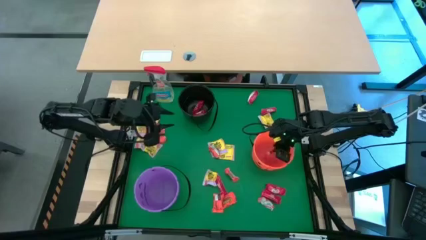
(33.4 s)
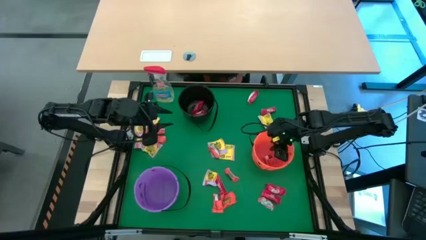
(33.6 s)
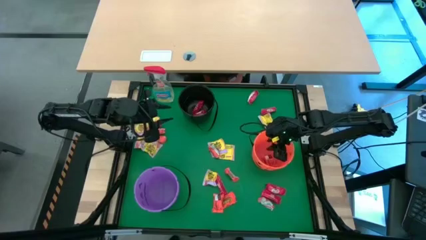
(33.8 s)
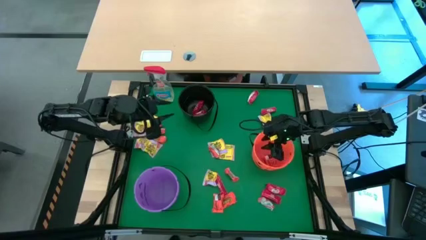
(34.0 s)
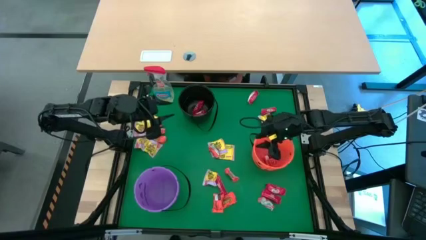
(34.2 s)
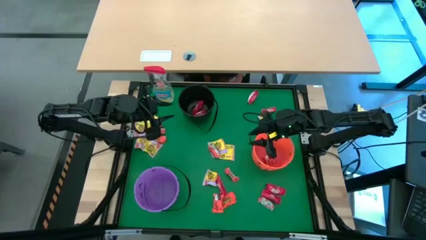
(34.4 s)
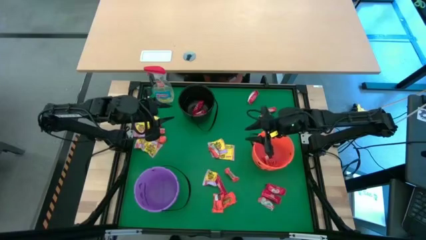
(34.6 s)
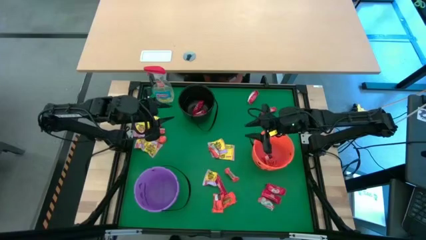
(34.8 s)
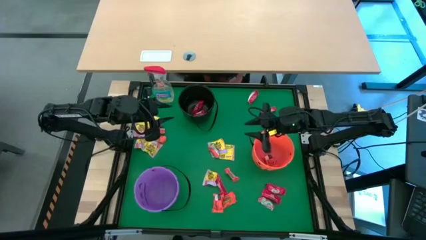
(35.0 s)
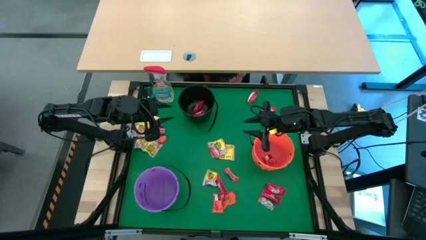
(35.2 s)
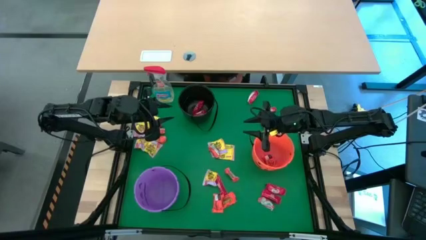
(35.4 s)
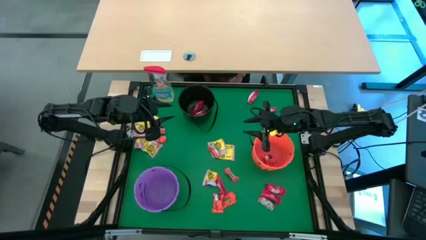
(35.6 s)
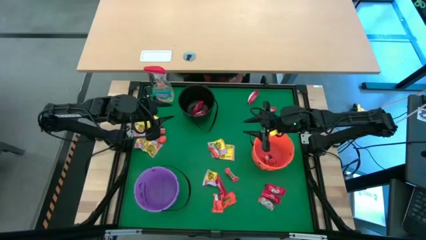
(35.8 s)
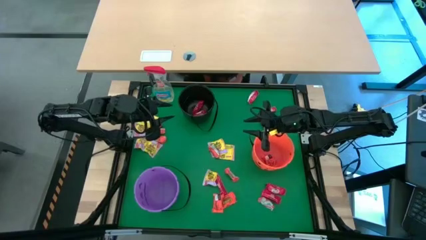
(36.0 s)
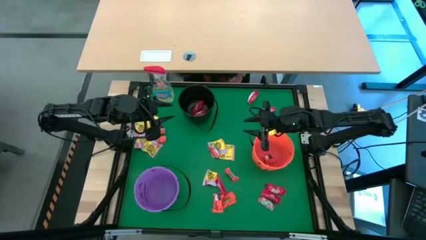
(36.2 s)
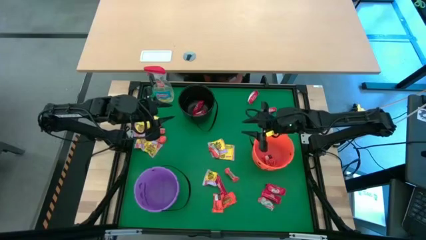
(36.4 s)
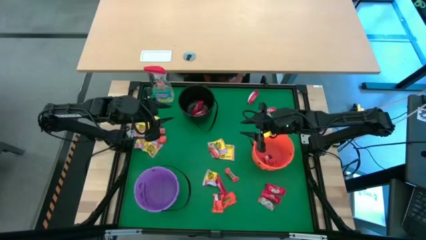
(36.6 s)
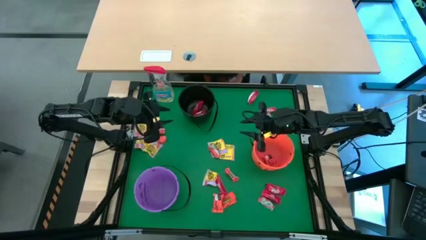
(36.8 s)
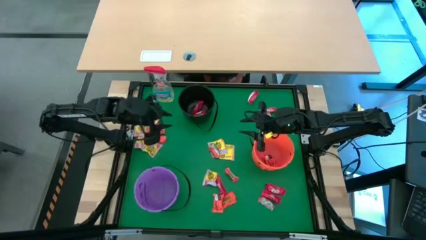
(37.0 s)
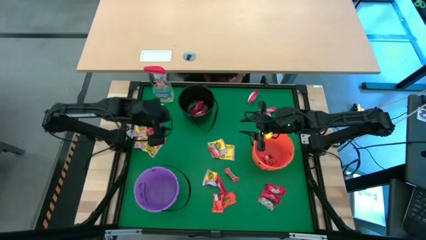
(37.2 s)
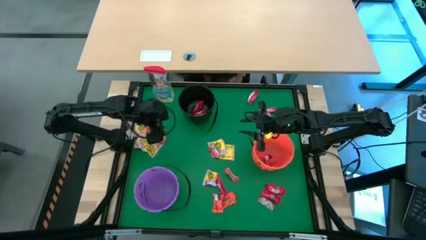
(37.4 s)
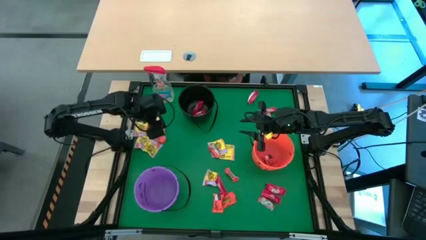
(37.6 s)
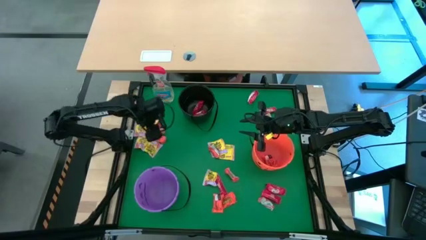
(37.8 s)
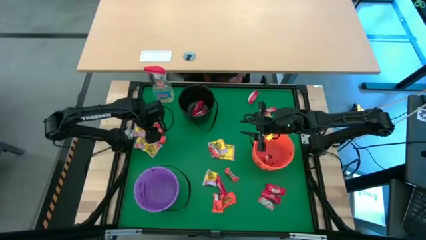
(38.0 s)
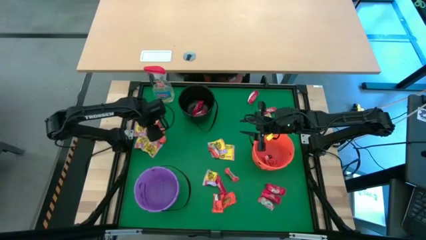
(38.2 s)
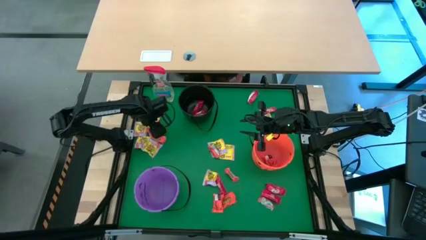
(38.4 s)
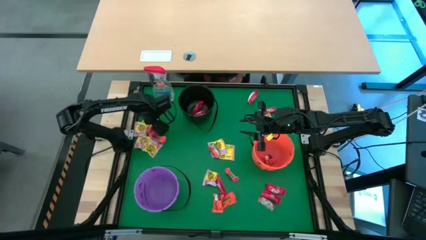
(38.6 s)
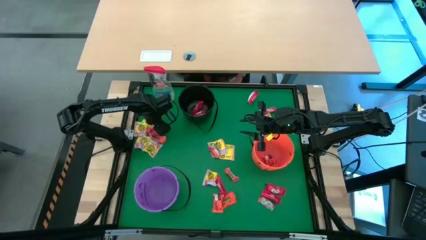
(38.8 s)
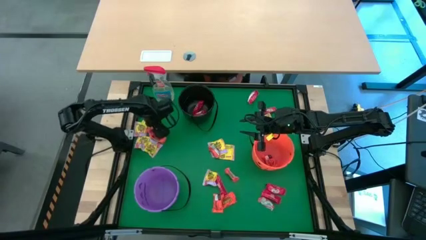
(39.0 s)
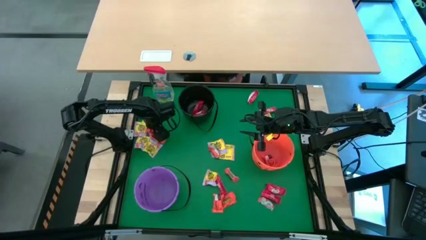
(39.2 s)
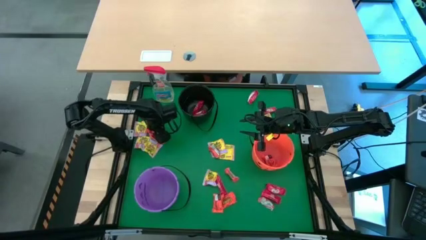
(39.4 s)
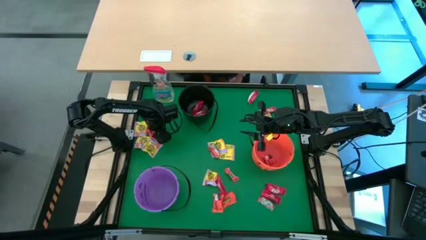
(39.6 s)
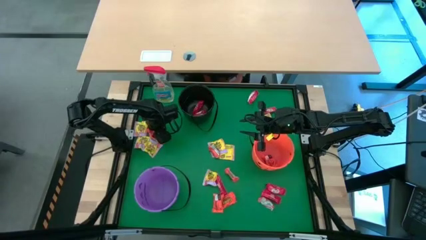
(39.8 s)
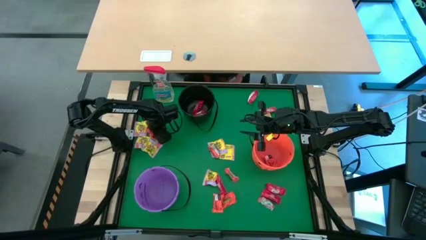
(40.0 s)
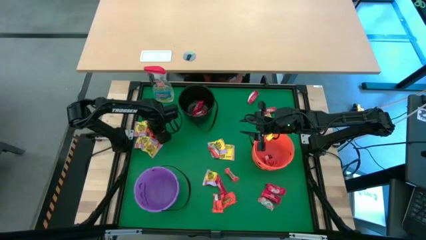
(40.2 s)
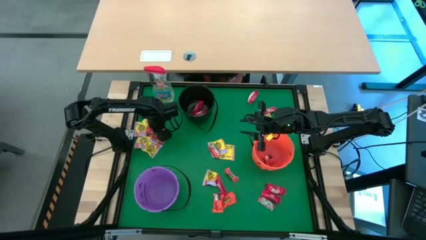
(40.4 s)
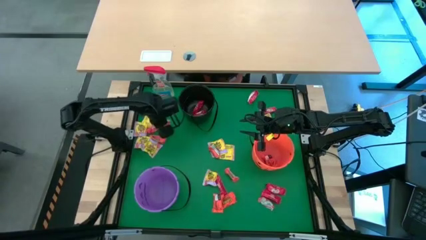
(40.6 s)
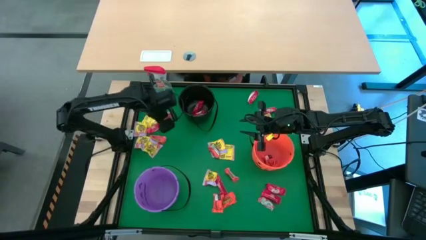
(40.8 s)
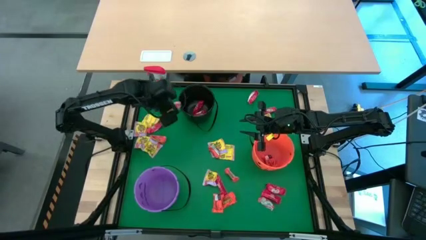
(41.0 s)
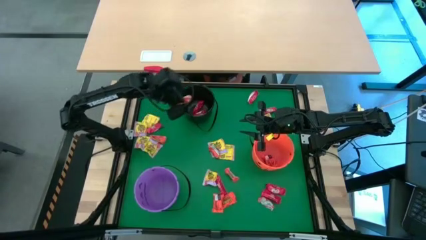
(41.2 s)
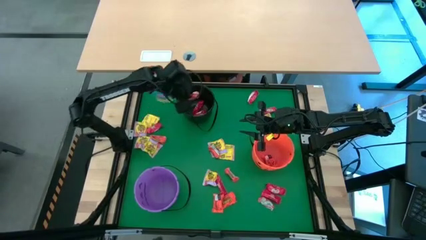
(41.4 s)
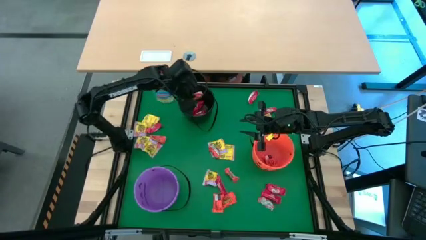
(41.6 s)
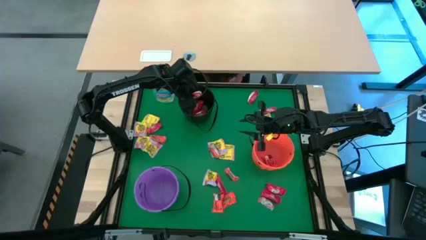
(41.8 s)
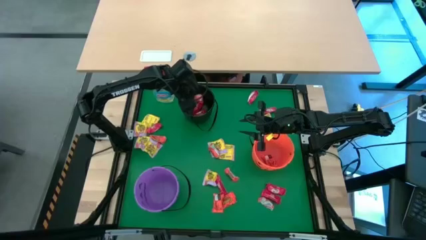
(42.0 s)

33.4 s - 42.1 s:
Task: Sort candy
Put the orange candy into the orange bucket

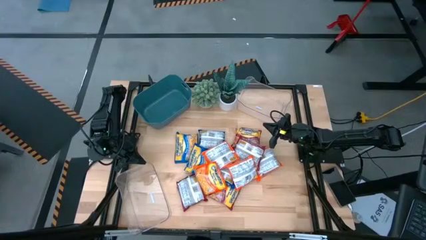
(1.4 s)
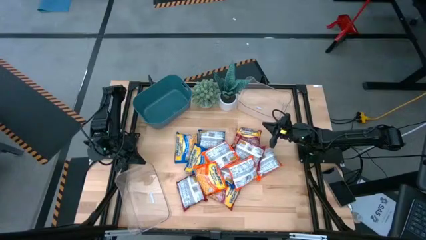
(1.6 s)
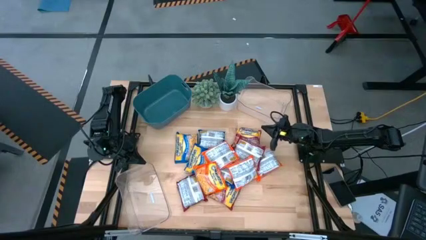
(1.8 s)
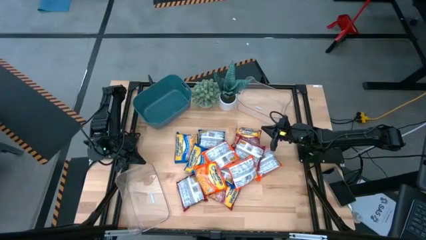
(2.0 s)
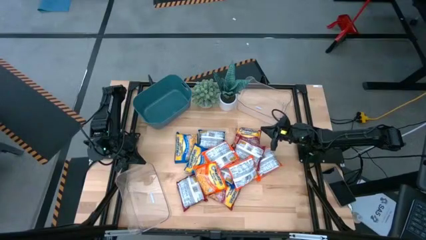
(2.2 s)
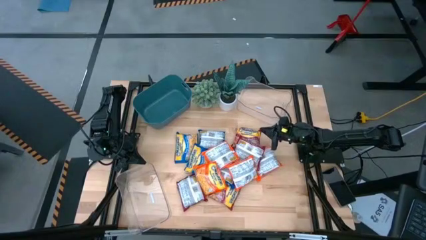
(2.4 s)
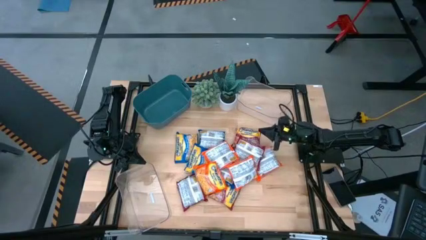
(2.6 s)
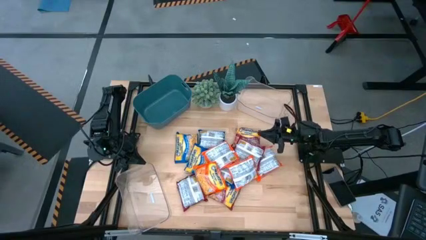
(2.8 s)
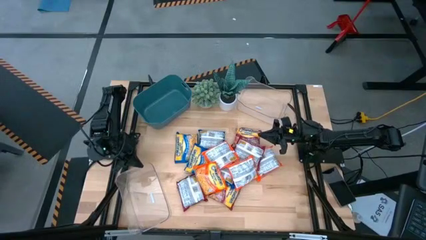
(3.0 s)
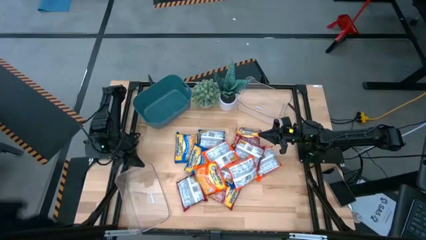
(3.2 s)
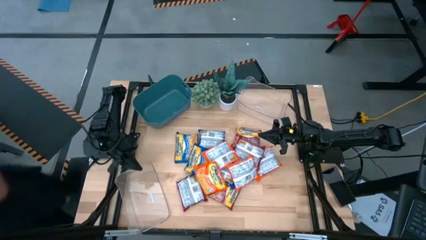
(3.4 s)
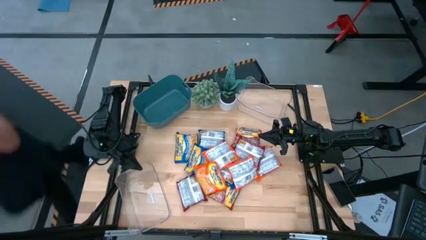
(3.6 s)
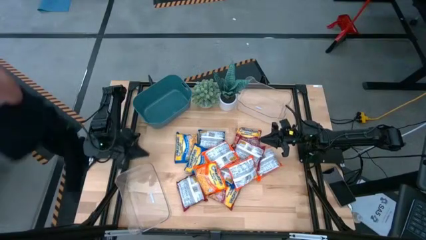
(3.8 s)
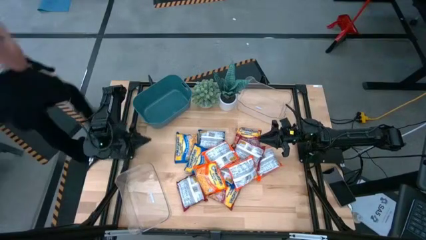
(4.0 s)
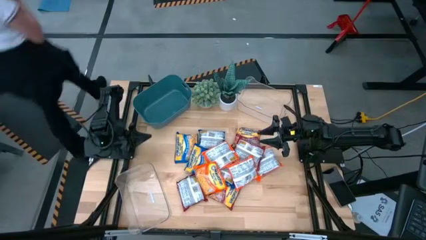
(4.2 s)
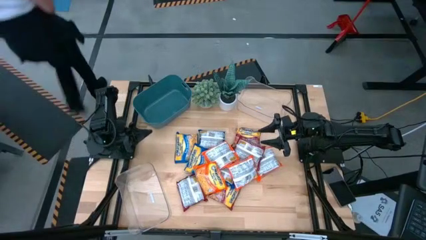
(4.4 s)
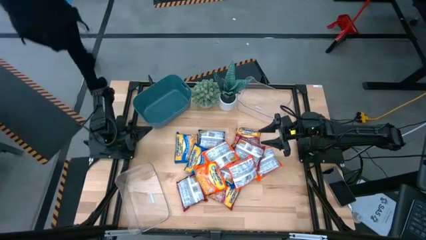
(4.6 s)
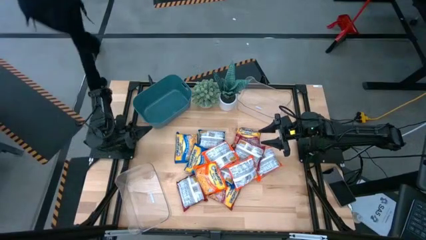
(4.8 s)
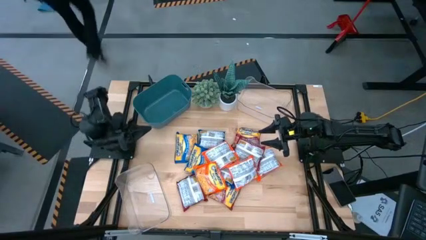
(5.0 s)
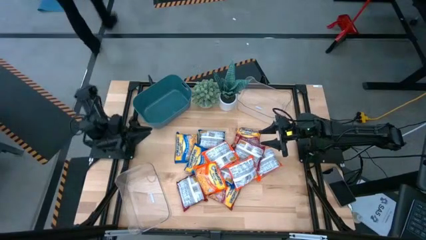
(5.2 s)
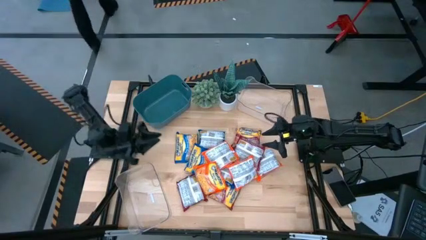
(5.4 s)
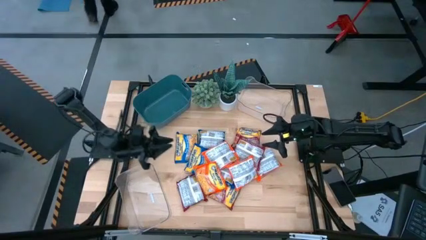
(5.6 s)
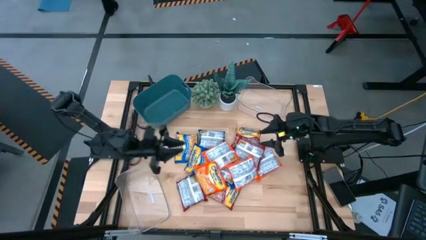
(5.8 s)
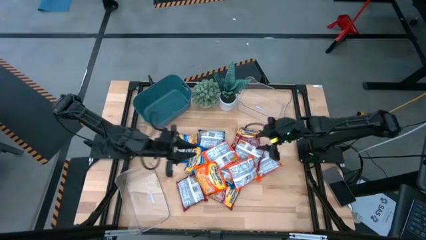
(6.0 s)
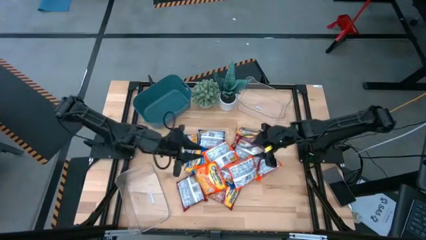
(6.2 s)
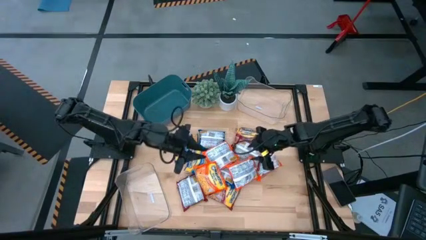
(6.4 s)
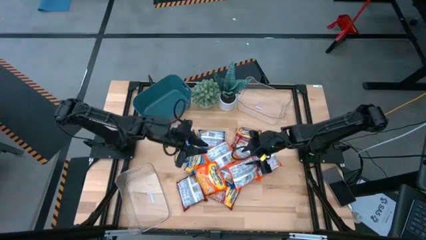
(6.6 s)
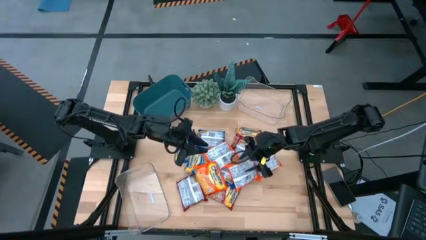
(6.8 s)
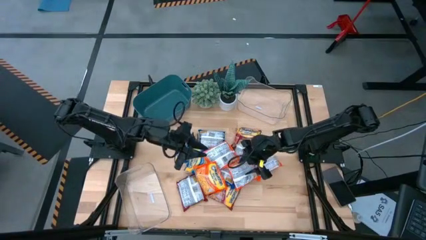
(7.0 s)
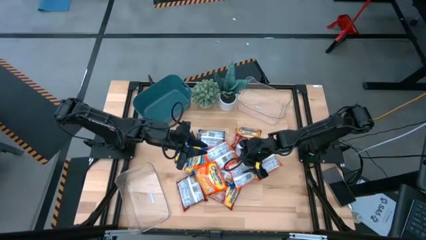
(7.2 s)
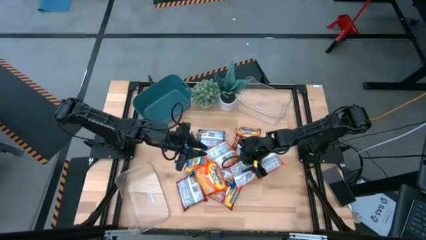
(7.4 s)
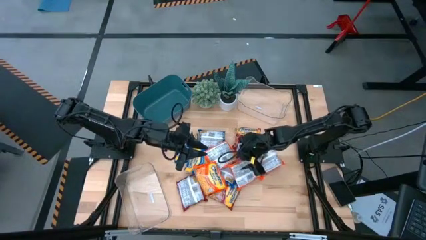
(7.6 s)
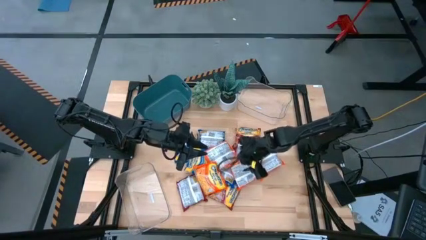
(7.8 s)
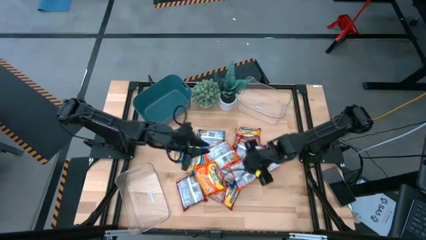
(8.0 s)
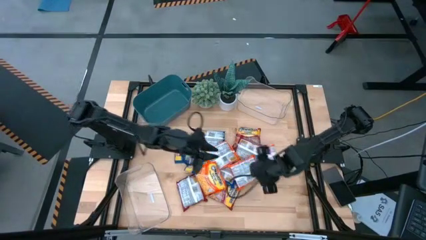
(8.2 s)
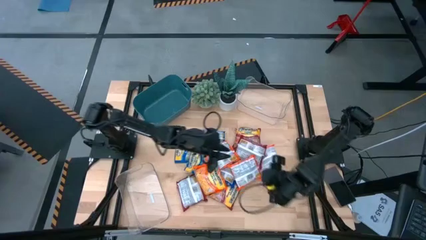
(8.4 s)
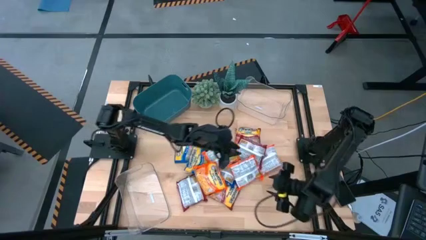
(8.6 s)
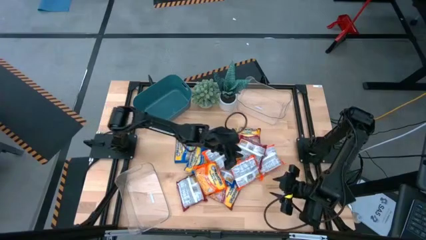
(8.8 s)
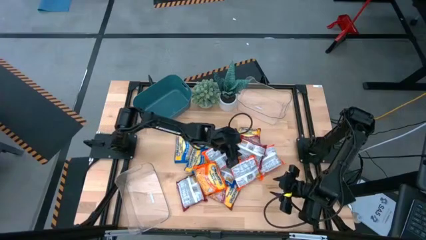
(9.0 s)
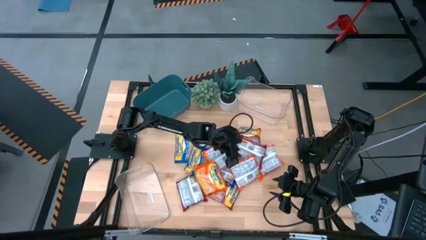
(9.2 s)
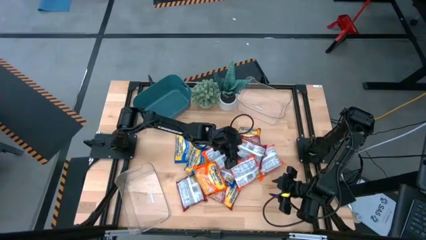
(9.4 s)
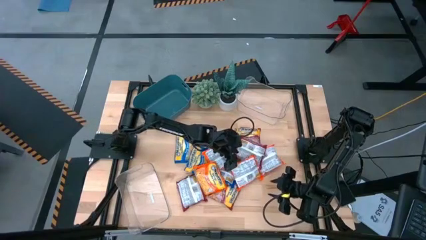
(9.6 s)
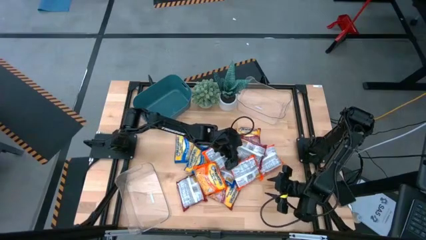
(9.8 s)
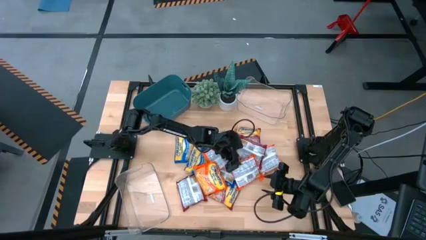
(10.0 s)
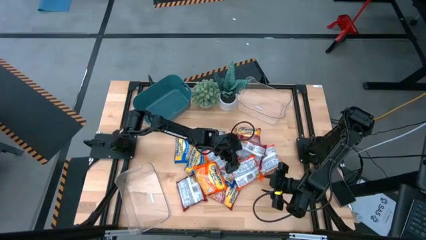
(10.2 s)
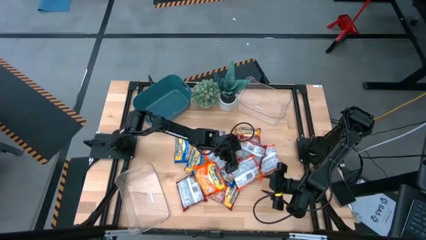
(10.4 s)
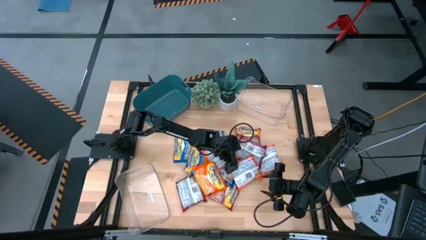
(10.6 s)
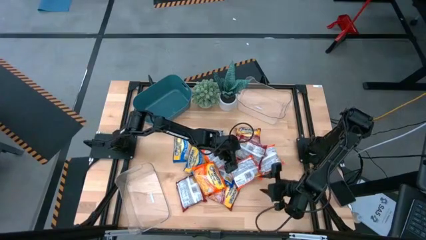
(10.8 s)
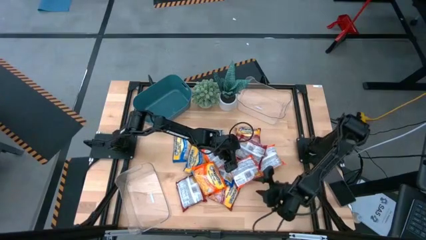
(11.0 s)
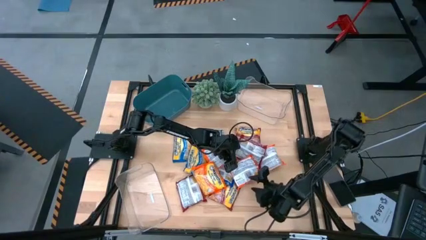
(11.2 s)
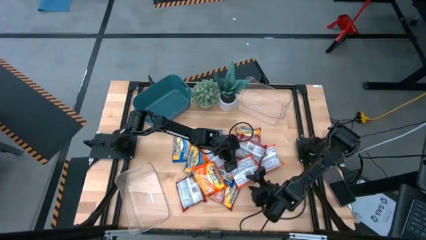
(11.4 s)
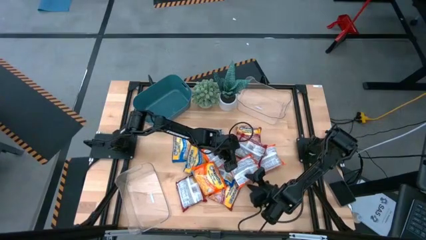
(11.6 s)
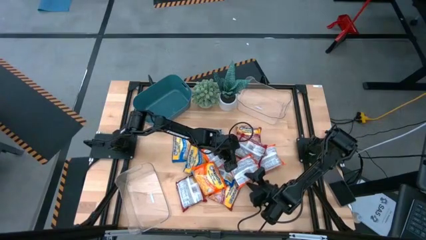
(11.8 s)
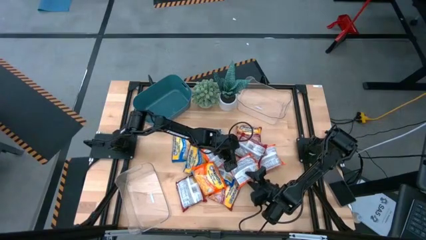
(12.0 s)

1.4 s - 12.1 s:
Task: Sort Maruchan noodles
Put the orange noodle pack into the bottom transparent bin
